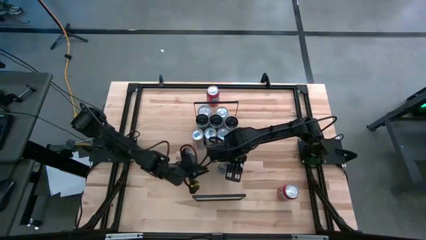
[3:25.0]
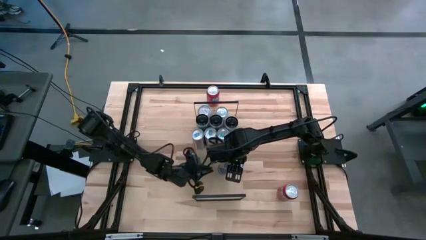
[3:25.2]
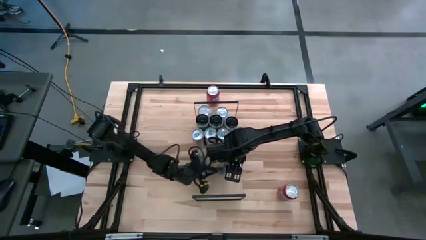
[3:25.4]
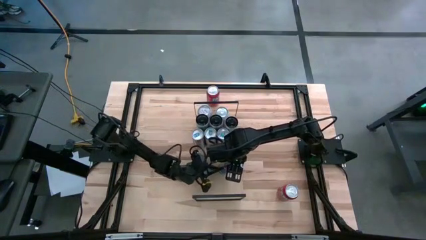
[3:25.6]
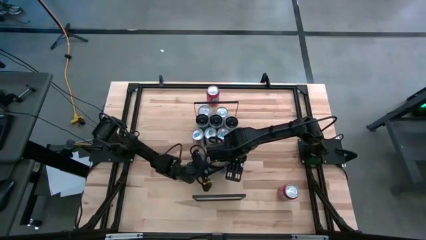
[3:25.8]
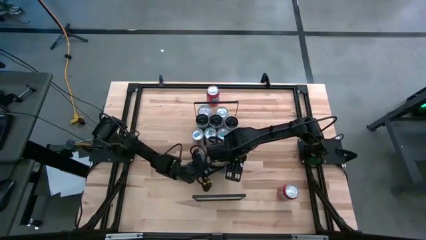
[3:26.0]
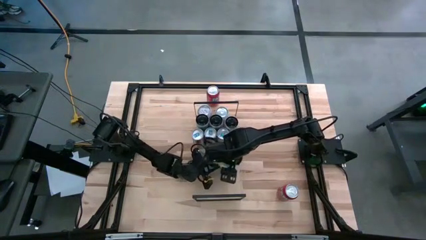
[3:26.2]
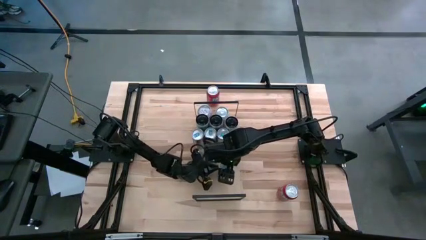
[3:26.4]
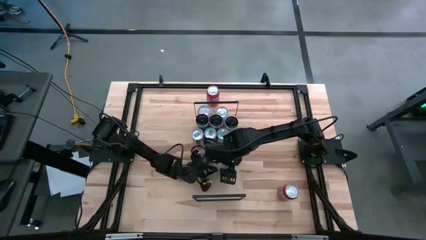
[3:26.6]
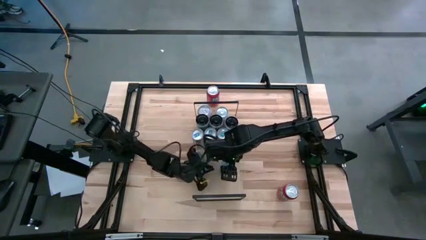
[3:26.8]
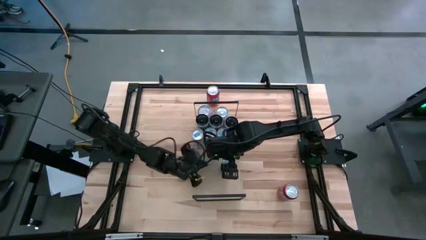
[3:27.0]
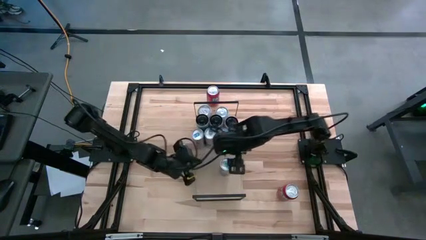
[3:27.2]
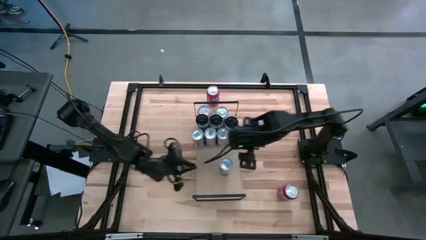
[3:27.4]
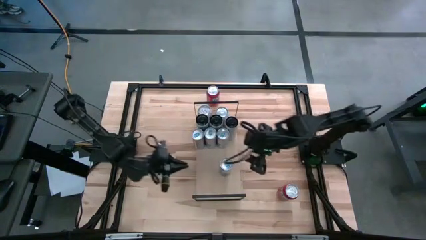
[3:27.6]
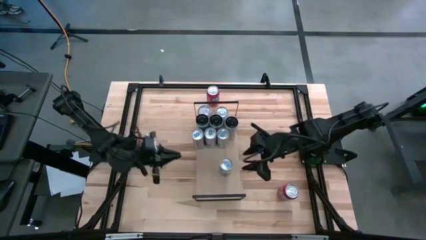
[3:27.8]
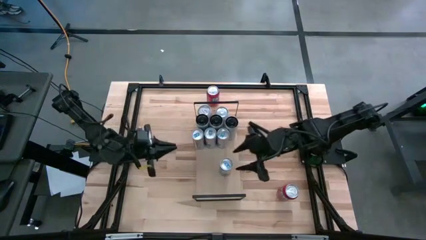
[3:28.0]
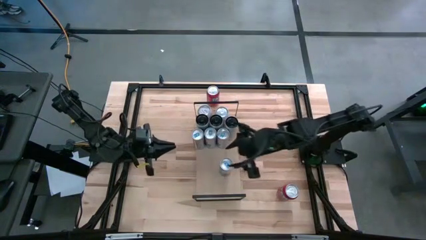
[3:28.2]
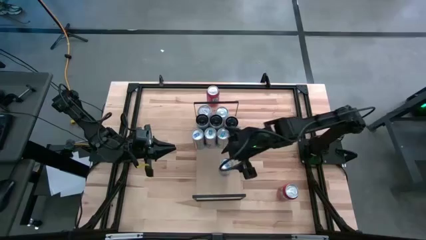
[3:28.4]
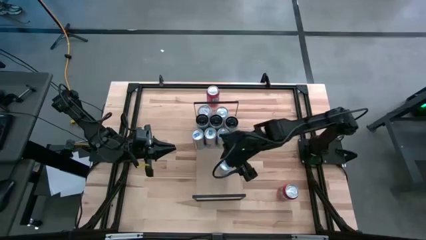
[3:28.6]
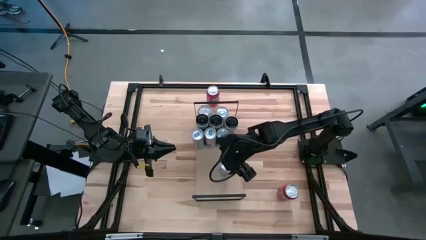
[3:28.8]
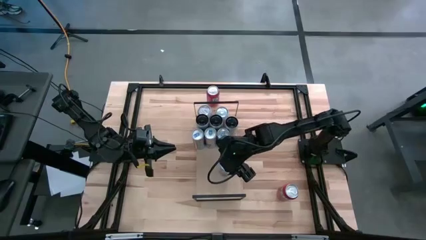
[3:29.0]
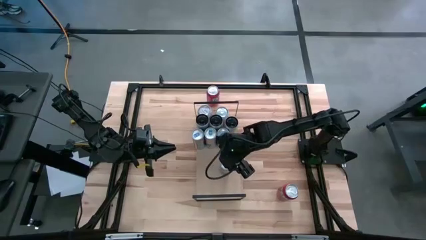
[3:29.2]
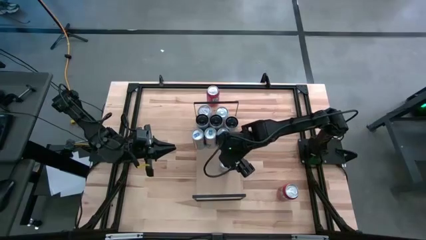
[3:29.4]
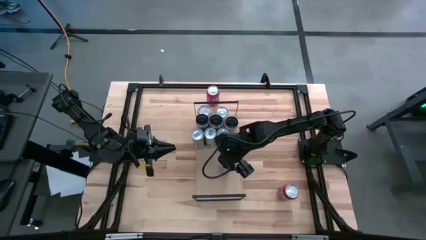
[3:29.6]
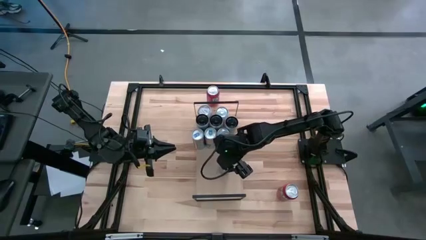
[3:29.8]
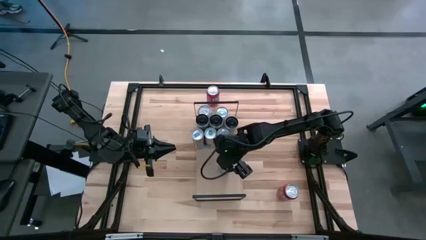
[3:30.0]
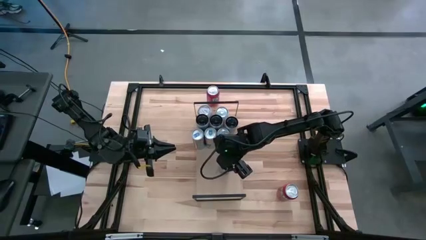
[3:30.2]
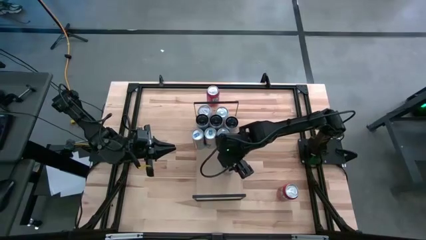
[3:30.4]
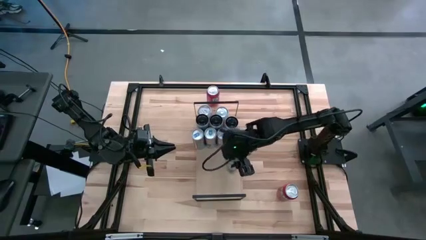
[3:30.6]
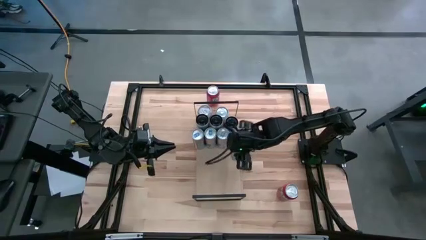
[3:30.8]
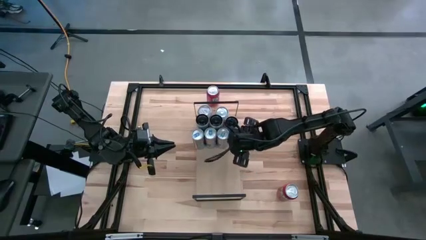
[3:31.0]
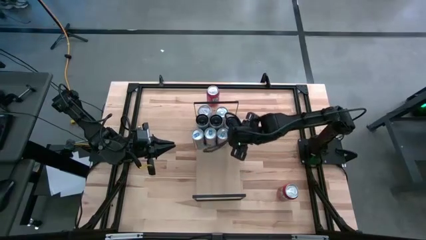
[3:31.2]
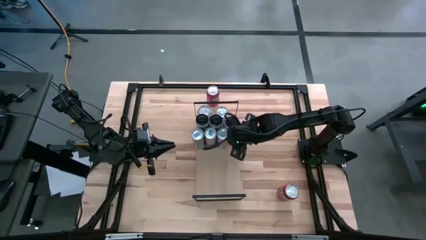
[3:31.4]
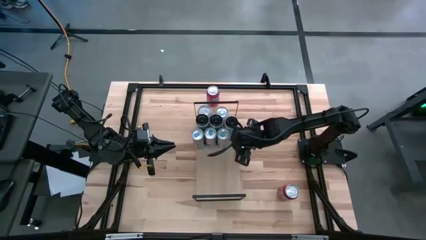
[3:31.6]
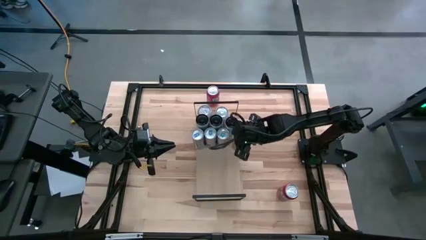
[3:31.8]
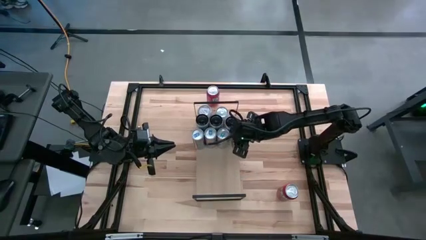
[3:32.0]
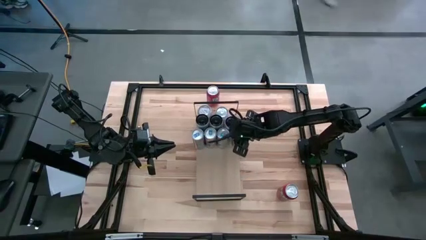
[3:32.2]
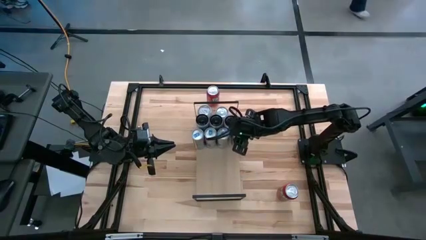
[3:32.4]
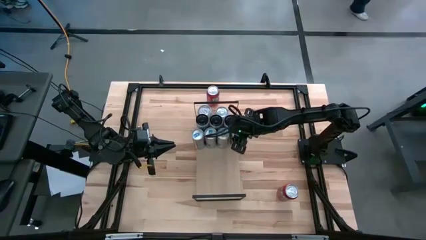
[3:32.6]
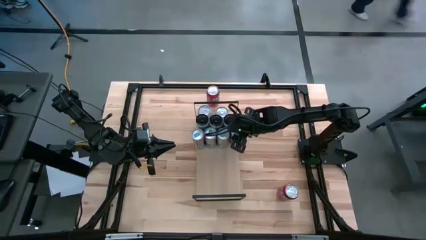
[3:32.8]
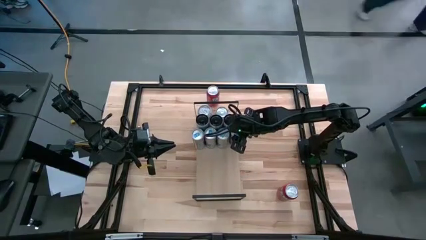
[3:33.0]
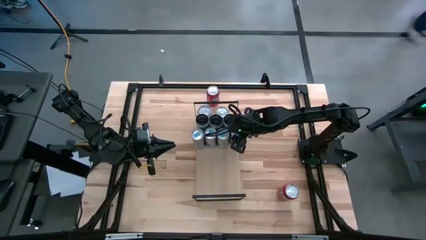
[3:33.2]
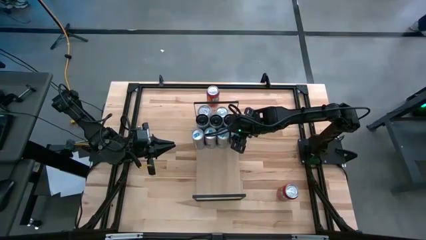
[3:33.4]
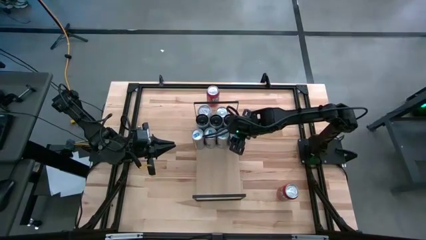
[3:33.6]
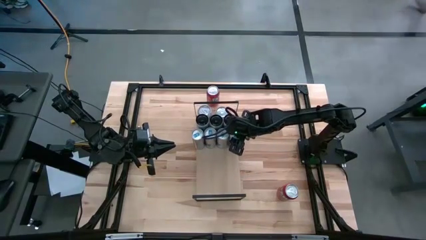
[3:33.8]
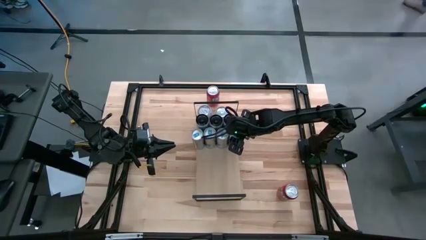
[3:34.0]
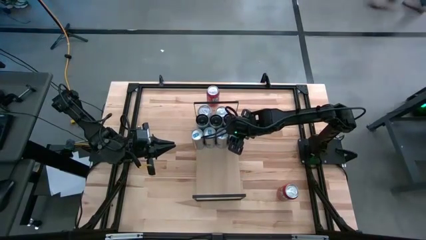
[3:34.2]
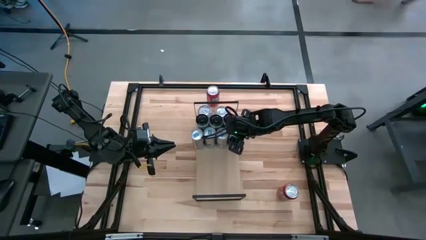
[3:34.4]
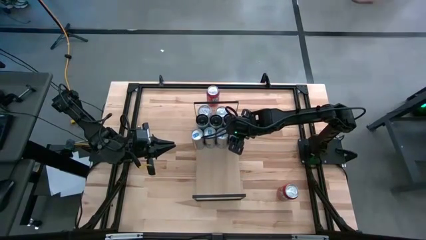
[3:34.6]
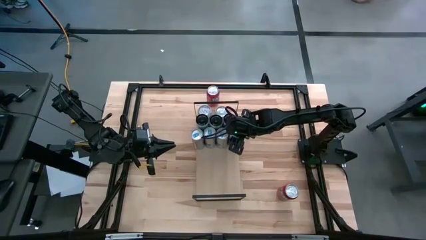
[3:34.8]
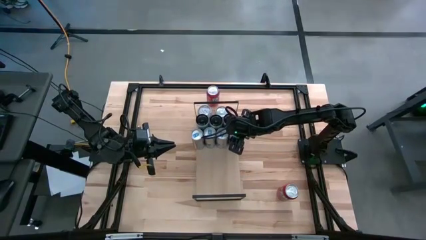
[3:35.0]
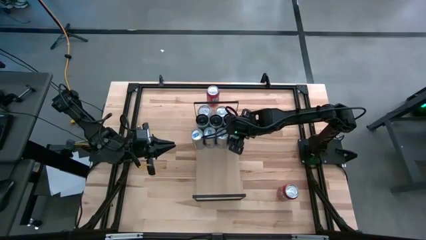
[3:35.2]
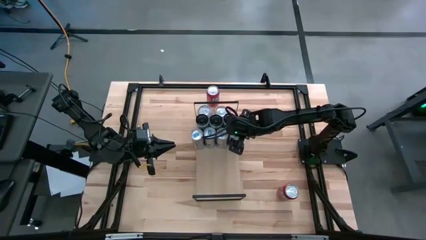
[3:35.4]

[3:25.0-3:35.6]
Task: Place canned beverage on shelf
Put the blue soda can on the shelf aligned with the other blue soda can

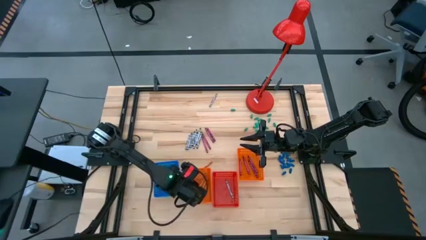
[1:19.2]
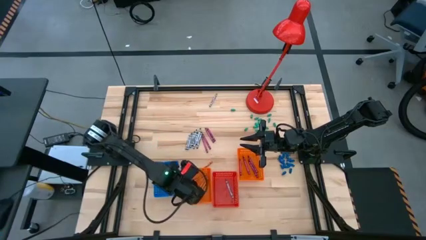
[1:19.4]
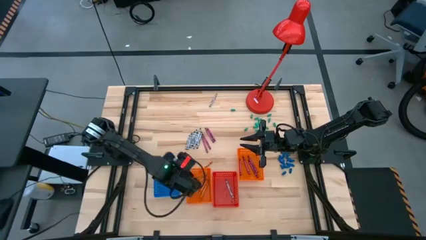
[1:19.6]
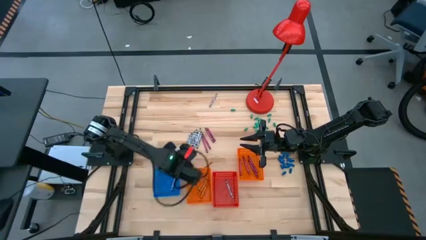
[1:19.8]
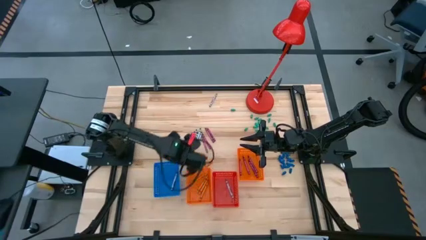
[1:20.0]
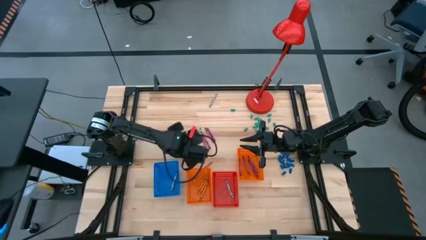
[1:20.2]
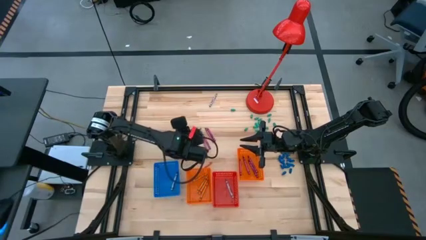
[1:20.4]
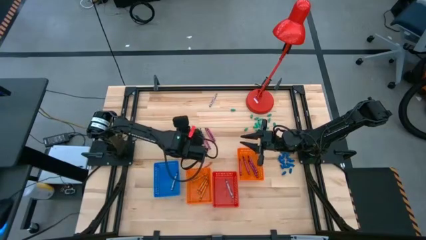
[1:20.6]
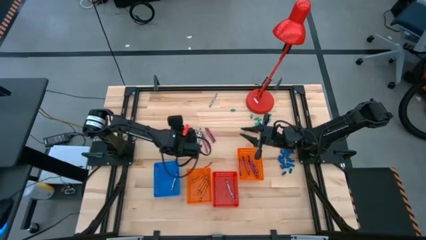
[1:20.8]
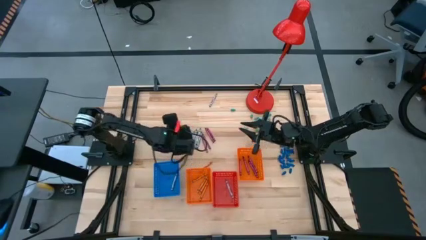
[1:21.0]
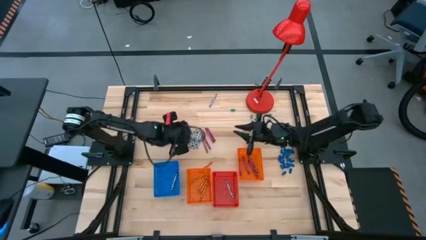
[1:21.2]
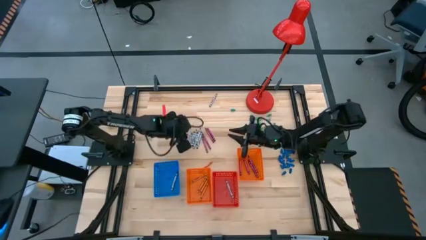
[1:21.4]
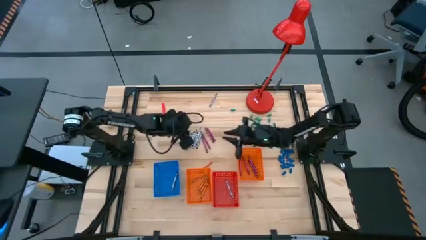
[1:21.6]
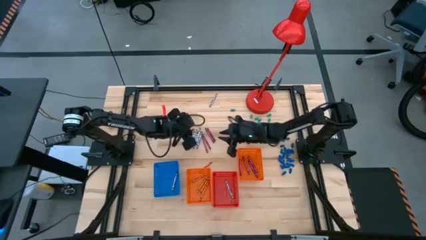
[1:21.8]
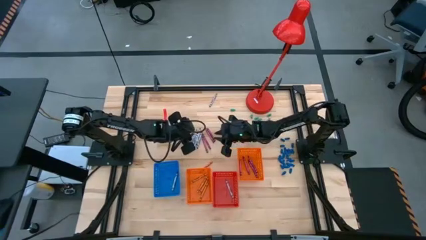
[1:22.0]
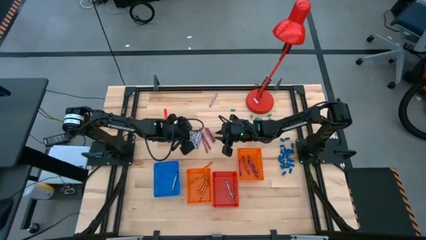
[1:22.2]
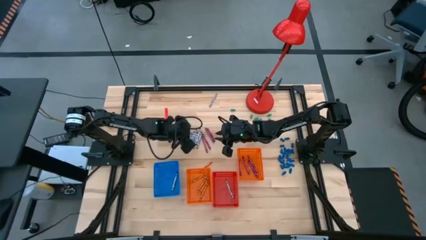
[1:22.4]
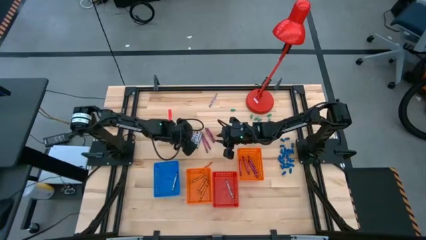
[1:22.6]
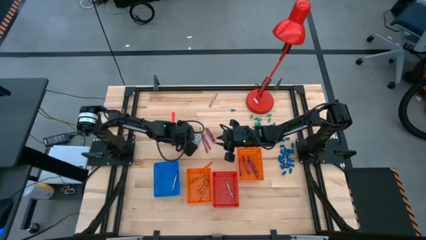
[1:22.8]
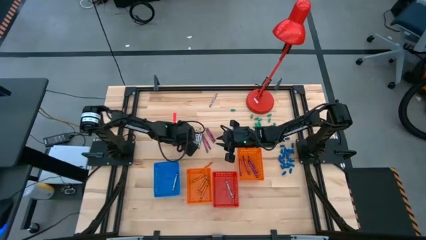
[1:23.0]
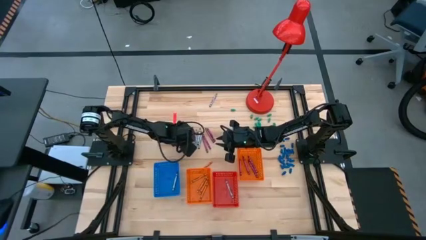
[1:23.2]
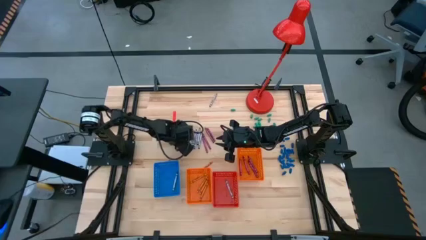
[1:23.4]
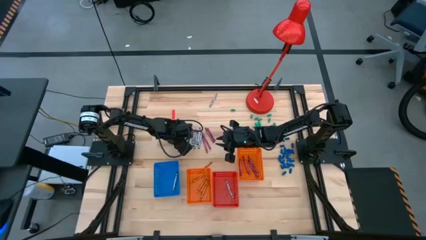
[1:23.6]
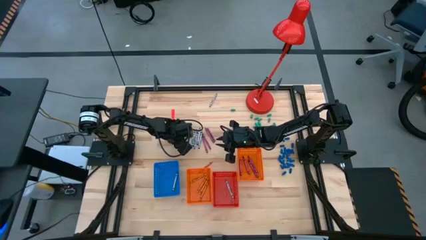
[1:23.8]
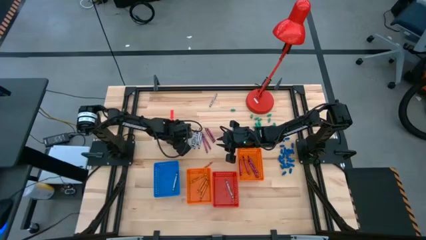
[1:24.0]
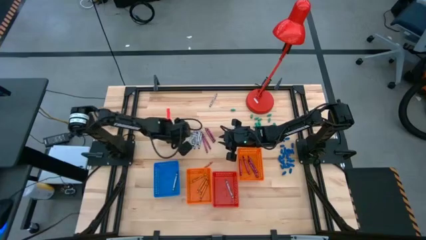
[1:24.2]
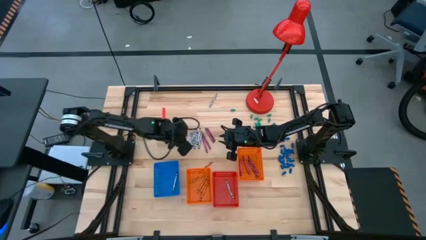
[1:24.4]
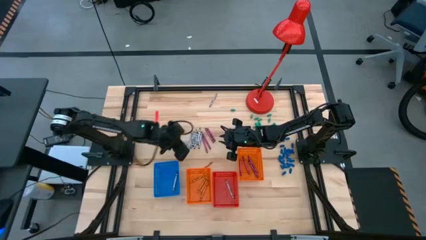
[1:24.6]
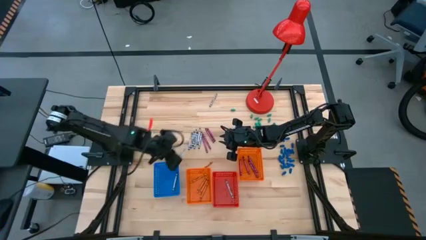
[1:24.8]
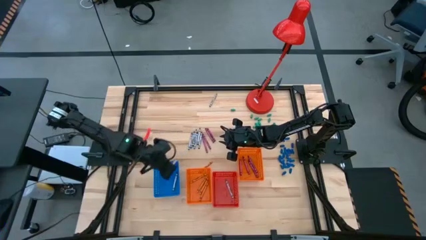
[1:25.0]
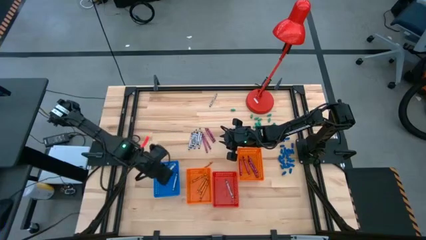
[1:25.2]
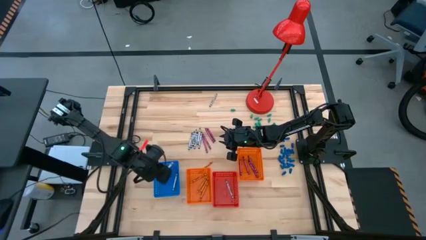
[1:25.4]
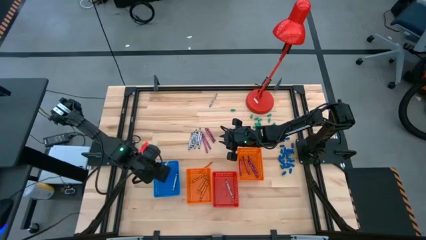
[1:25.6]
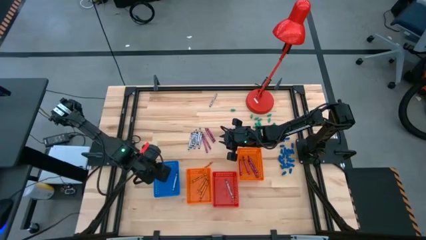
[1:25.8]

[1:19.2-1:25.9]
Task: Sort crayons
Put the black crayon into the blue bin
